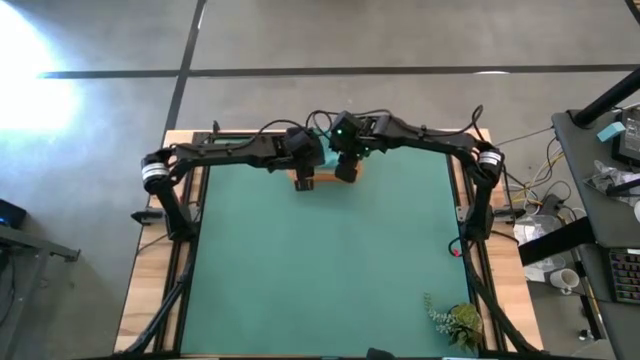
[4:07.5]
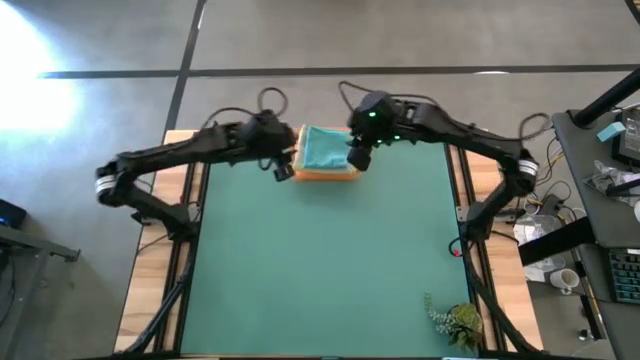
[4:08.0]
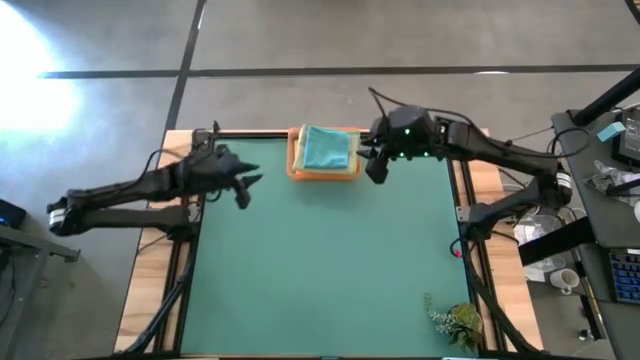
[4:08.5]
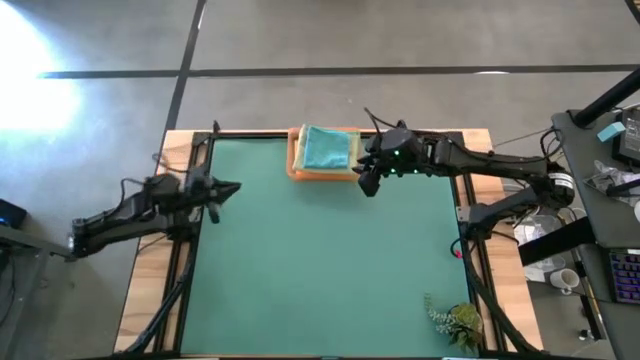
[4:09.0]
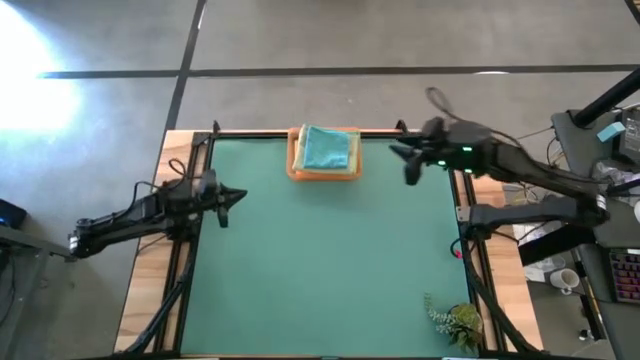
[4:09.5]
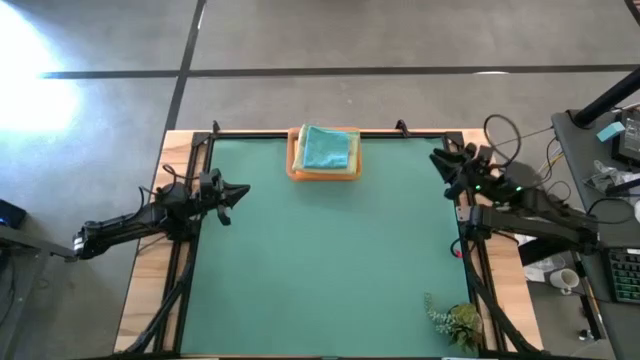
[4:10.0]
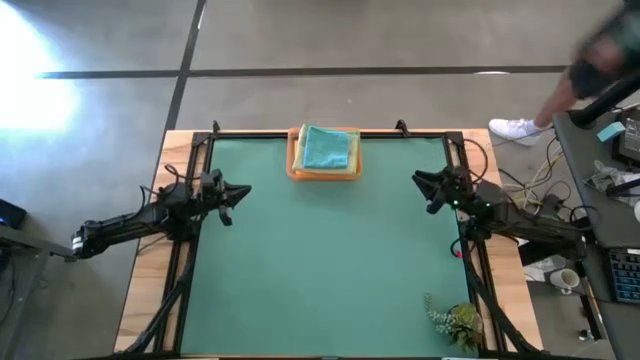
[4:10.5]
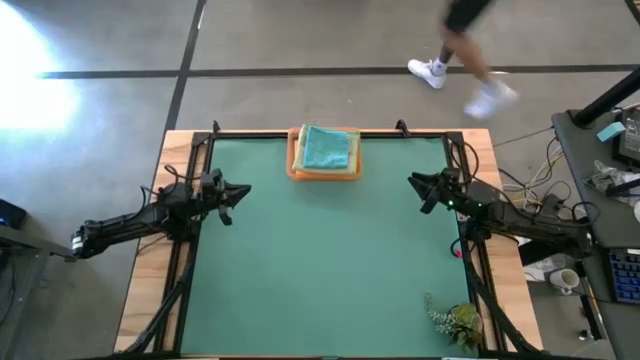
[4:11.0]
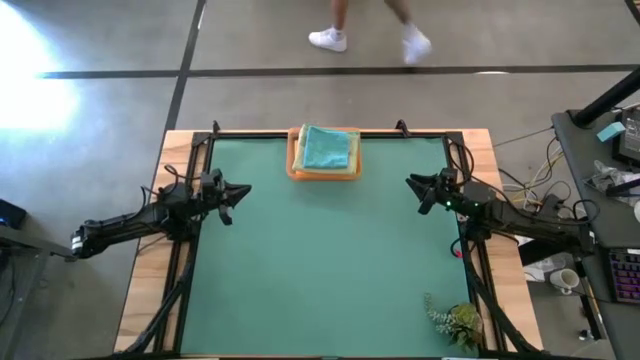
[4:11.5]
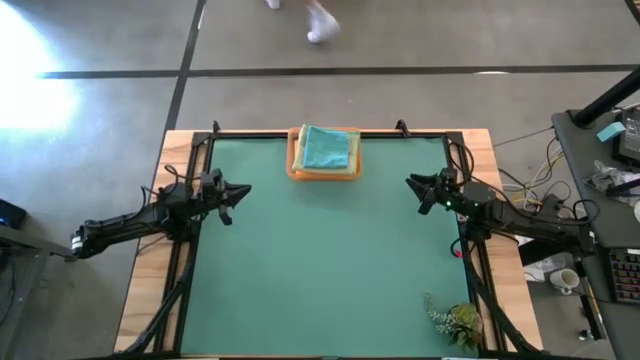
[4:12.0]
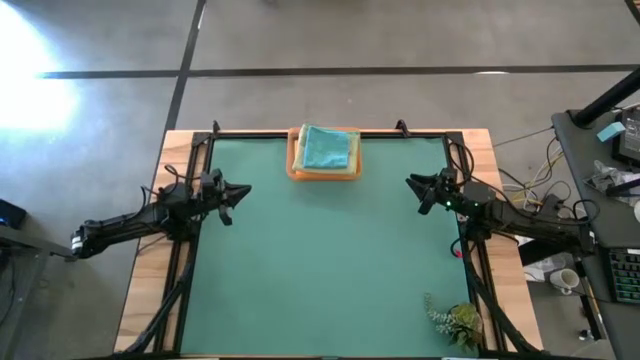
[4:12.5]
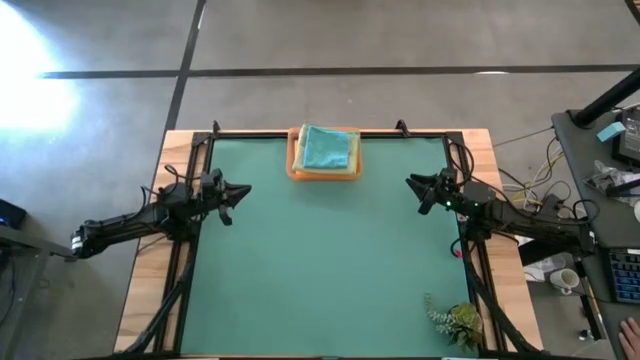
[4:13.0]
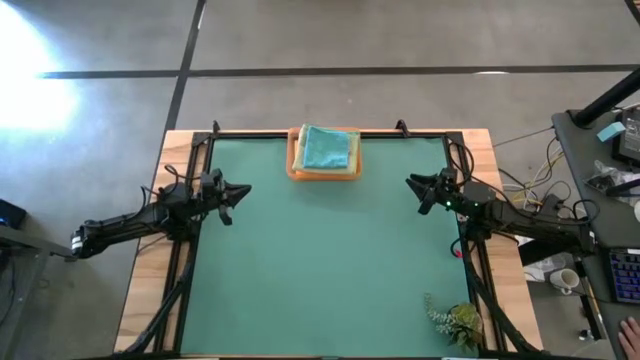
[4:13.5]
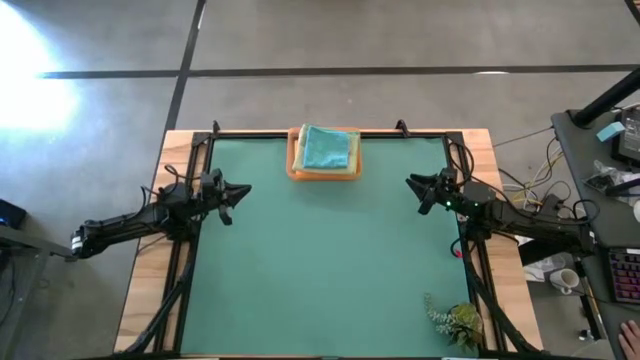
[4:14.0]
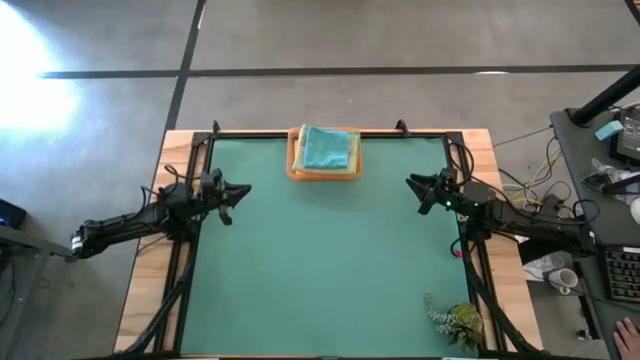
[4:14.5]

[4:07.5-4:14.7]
Task: Fold microfiber towels
Return to Home Position

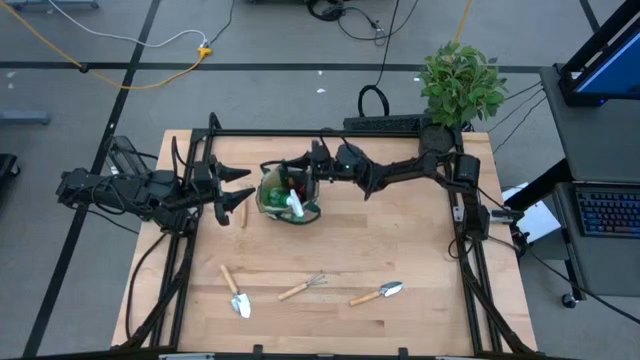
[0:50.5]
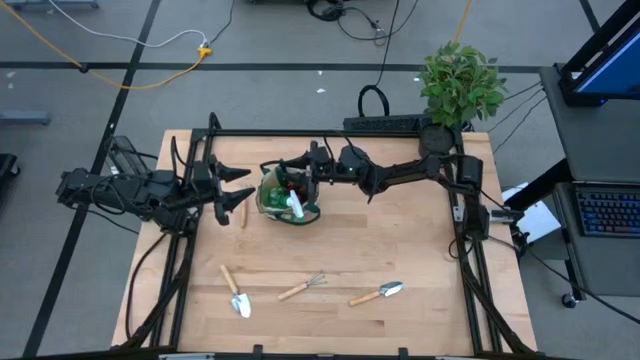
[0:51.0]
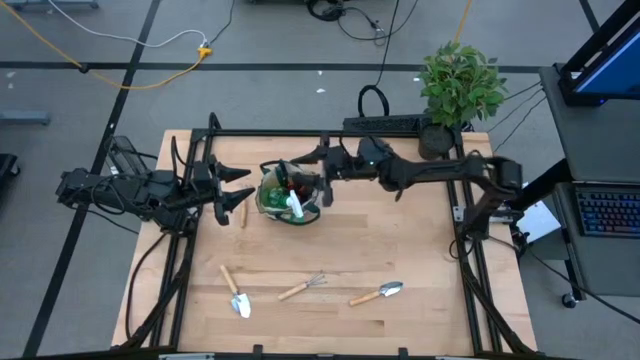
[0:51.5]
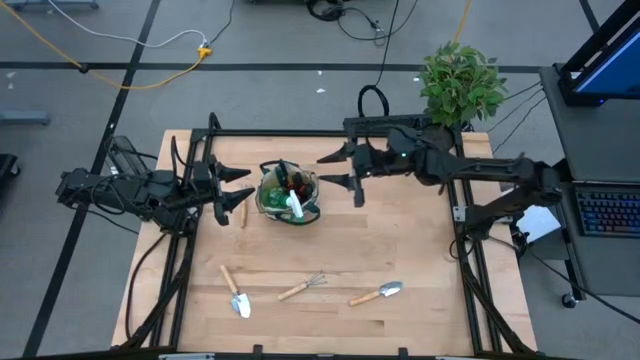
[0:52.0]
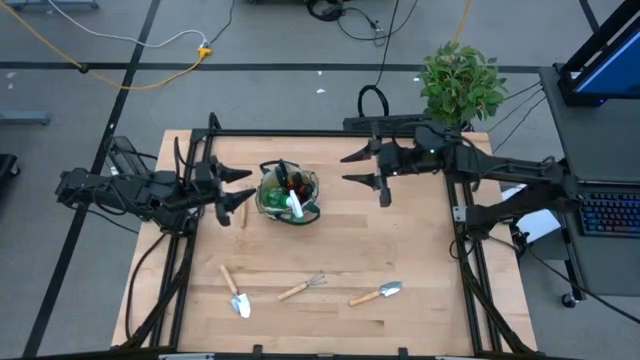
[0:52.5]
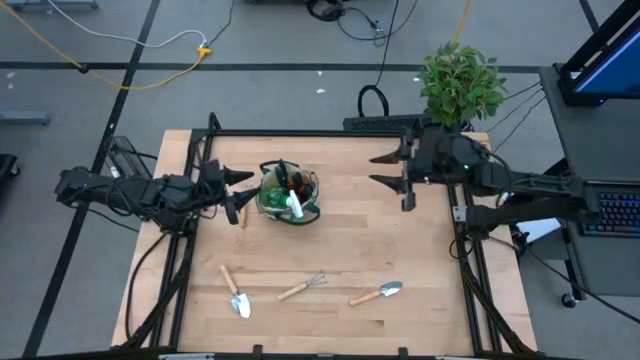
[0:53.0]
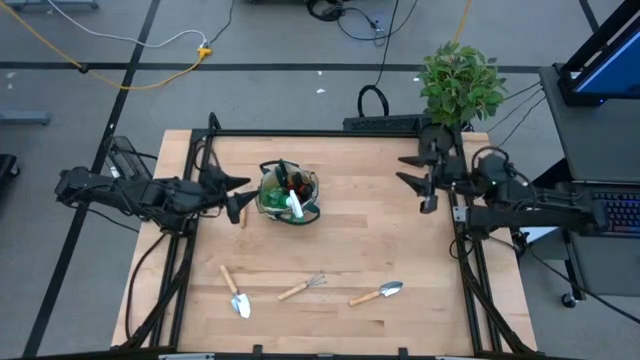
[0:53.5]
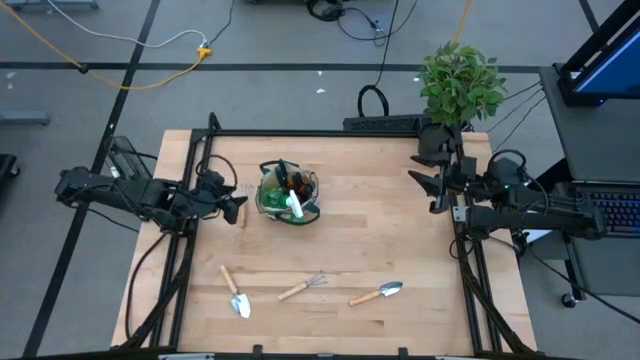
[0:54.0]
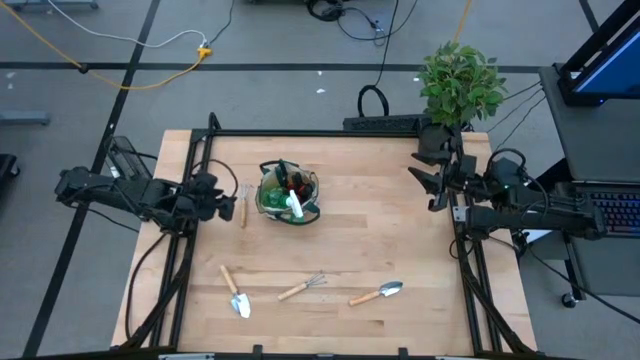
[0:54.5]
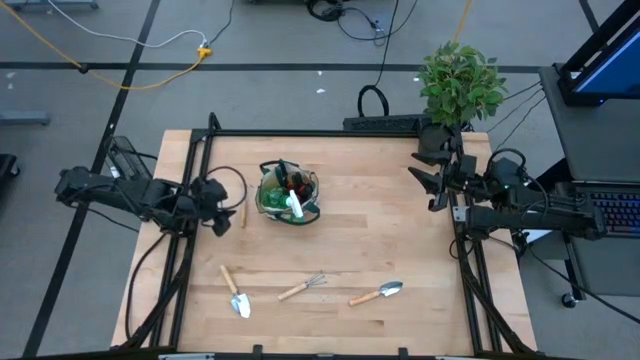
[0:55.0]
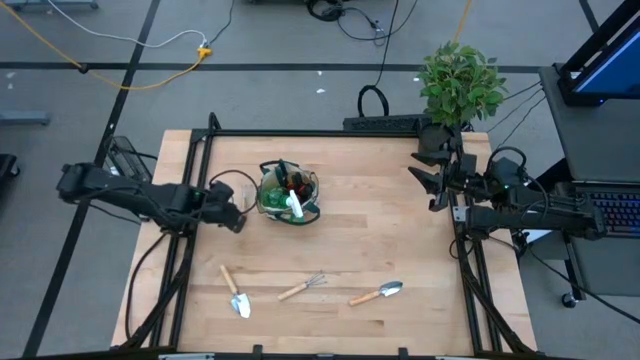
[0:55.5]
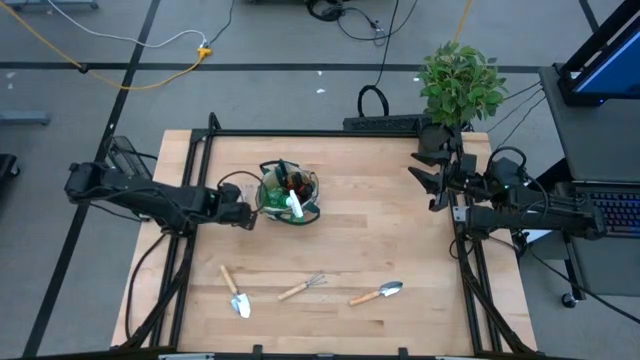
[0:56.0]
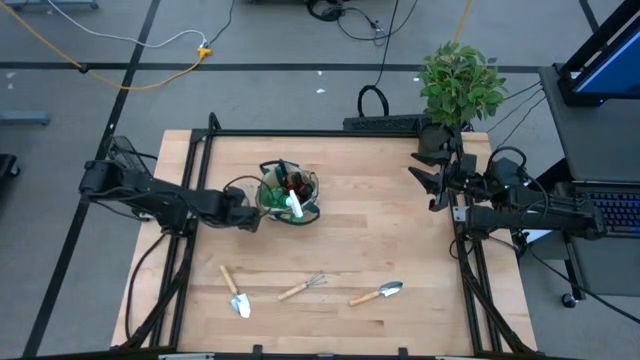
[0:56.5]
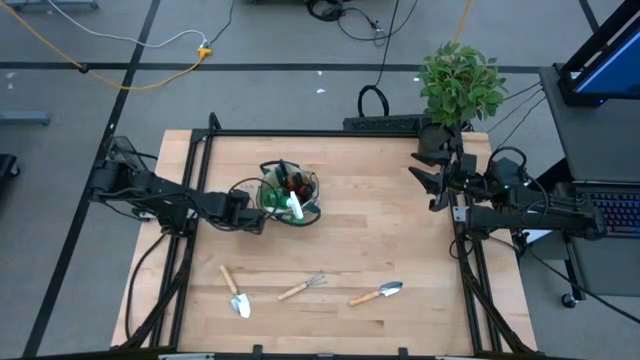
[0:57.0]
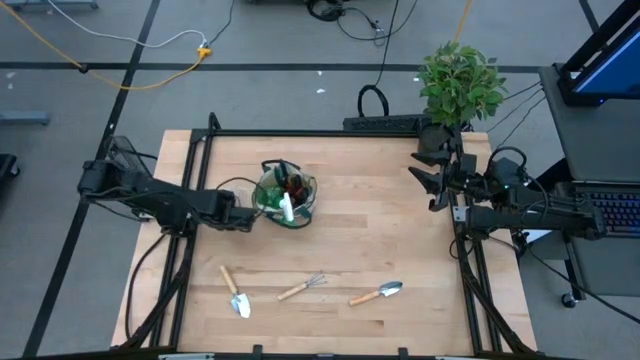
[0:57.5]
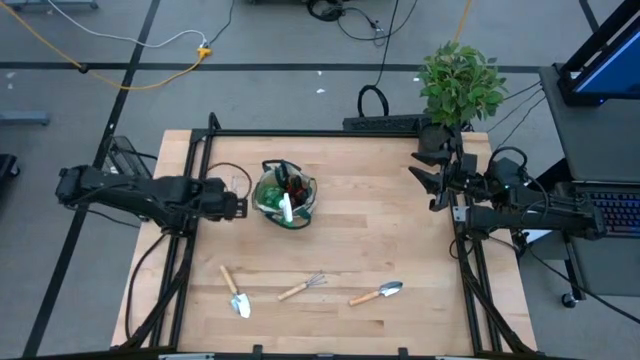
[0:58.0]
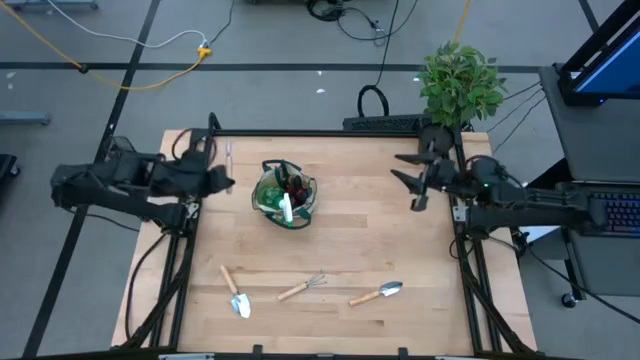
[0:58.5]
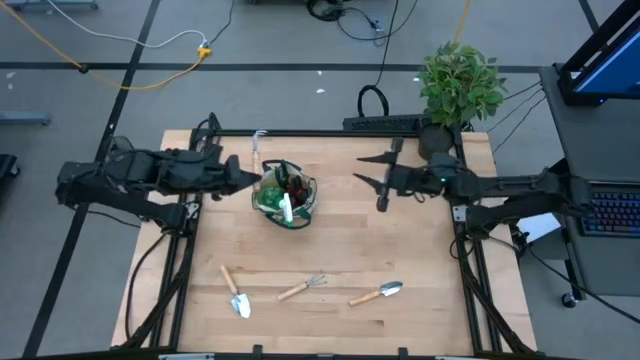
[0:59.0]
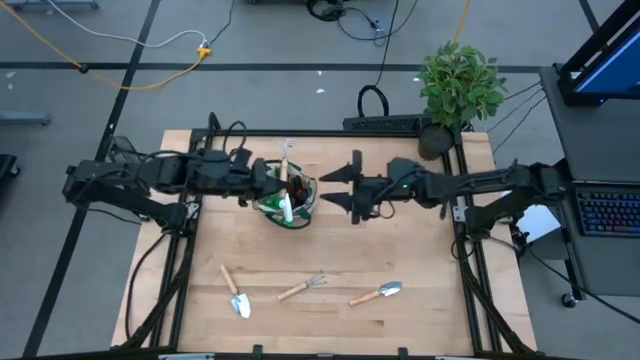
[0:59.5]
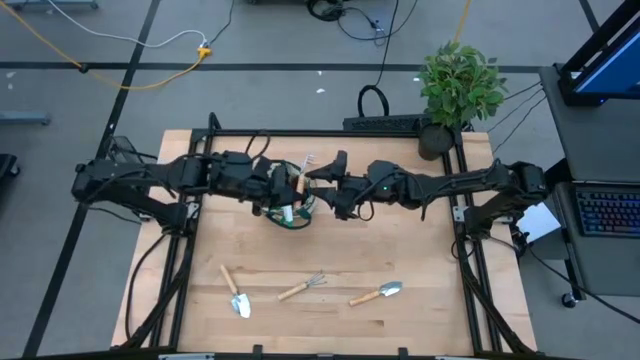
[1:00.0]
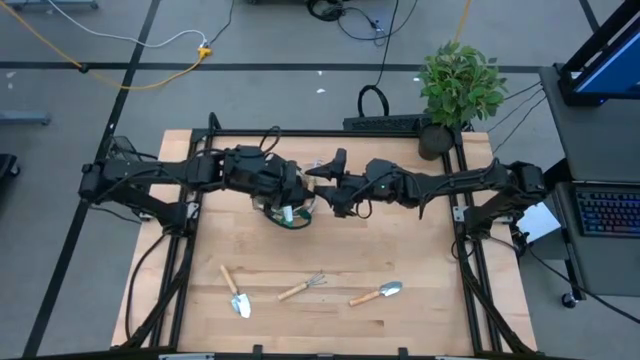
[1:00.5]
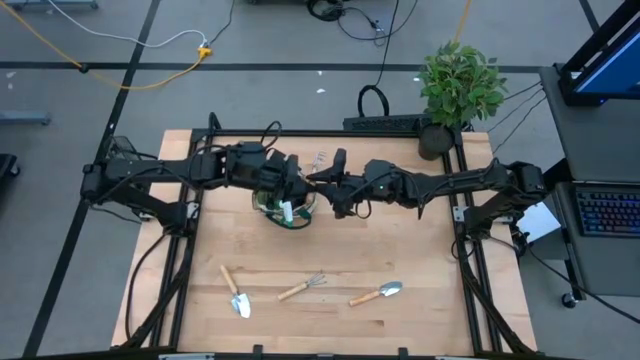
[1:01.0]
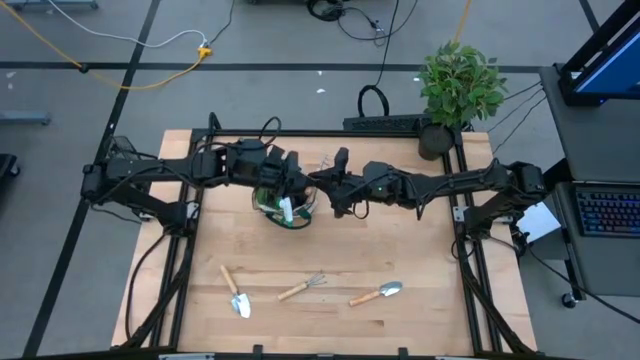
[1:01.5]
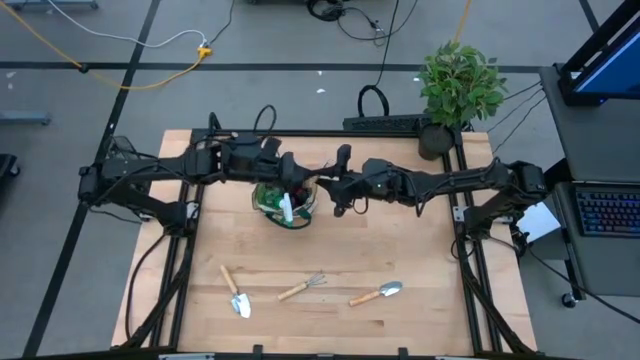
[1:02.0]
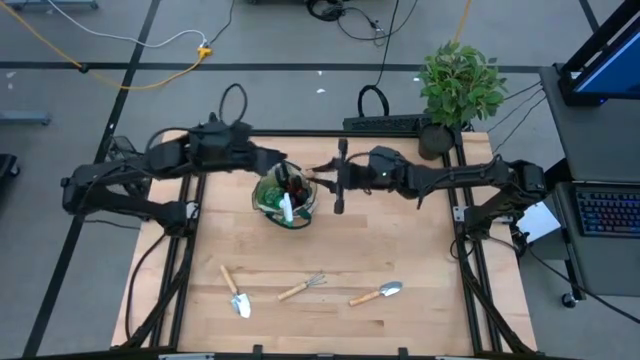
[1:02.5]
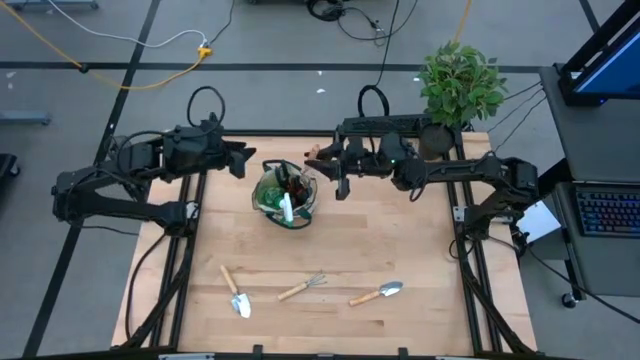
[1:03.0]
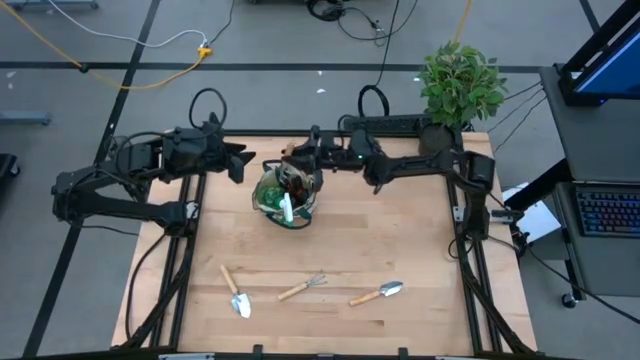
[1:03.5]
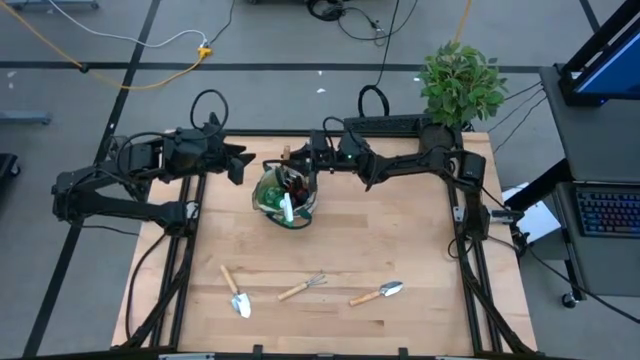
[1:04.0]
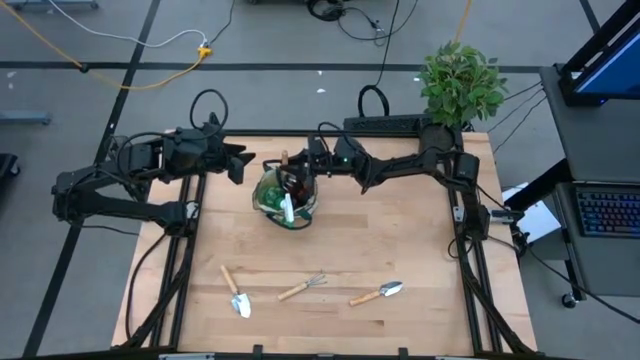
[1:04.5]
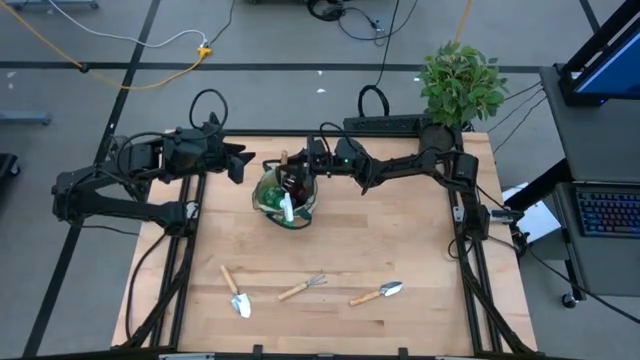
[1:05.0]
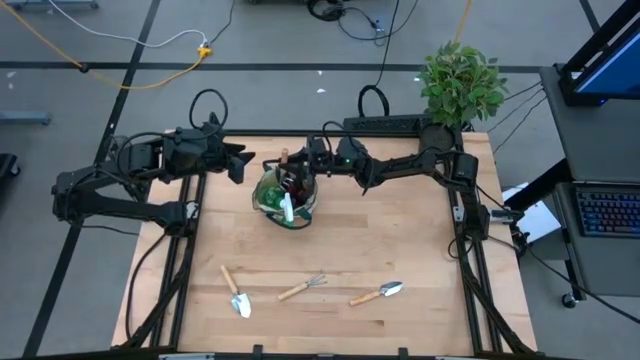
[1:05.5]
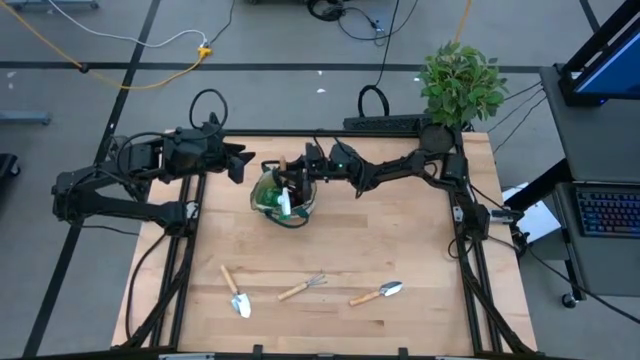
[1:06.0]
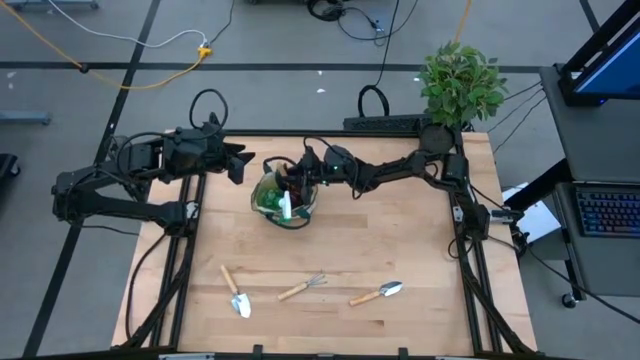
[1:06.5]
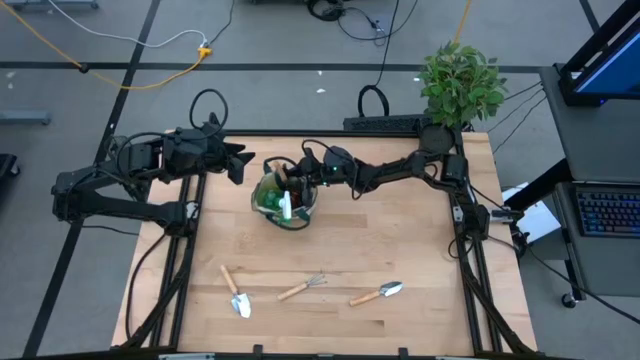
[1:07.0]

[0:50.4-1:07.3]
Task: Pick & Place Garden tools in Gardening bag
Put the top brown hand rake into the gardening bag
